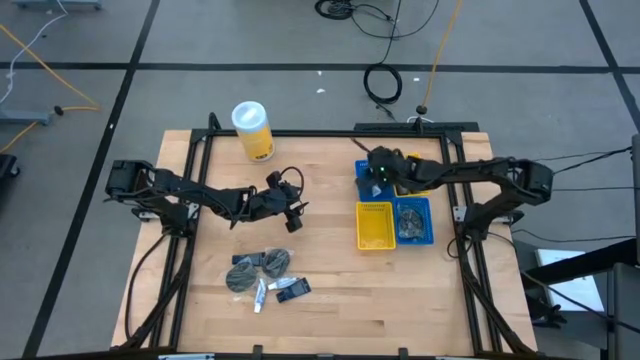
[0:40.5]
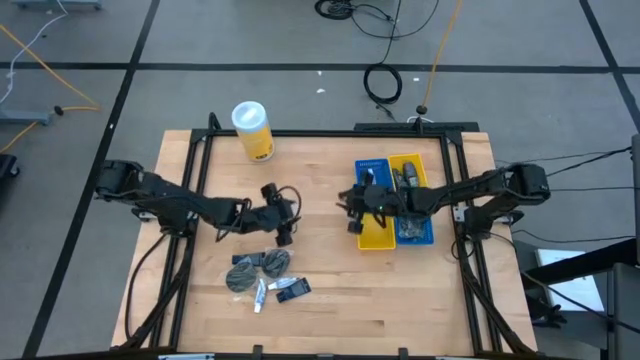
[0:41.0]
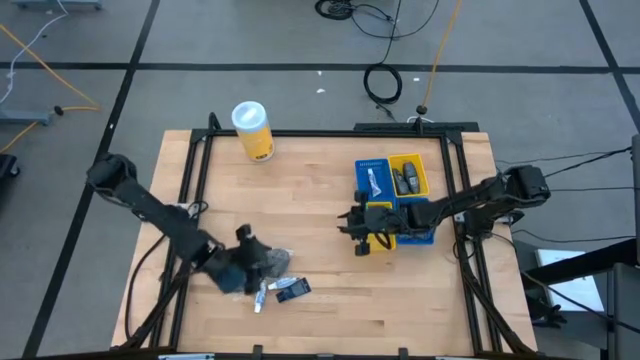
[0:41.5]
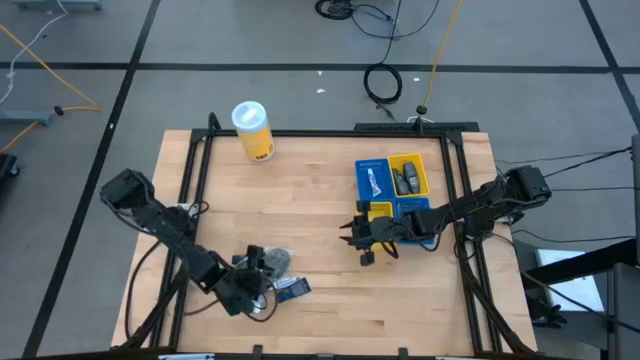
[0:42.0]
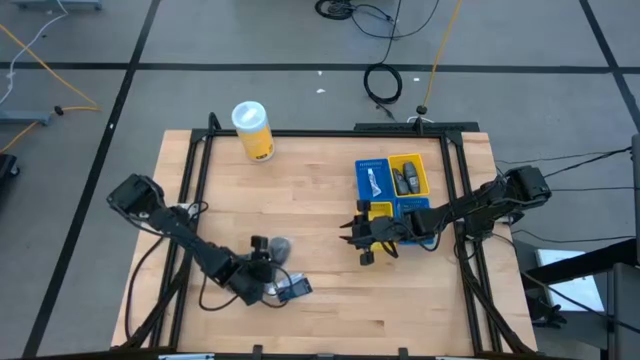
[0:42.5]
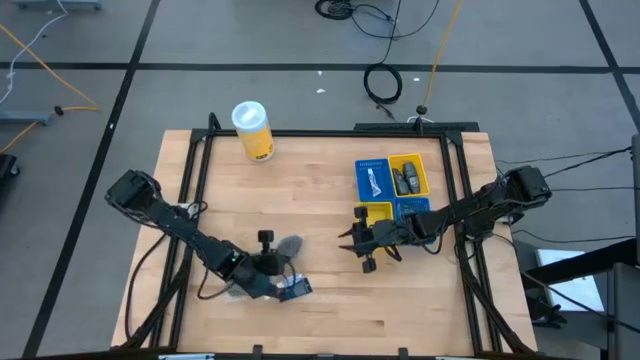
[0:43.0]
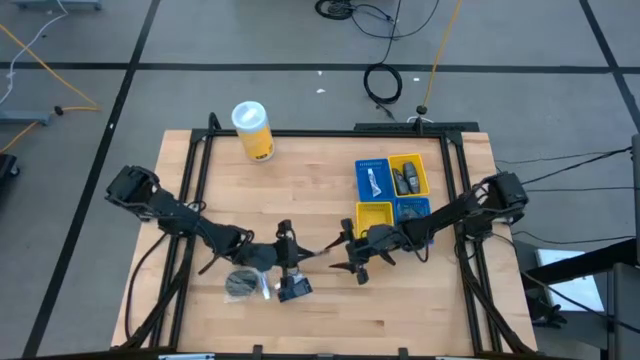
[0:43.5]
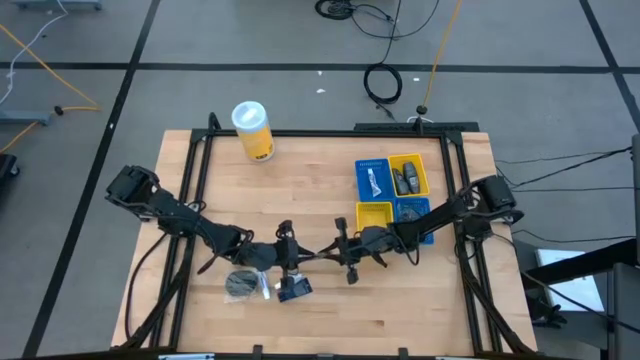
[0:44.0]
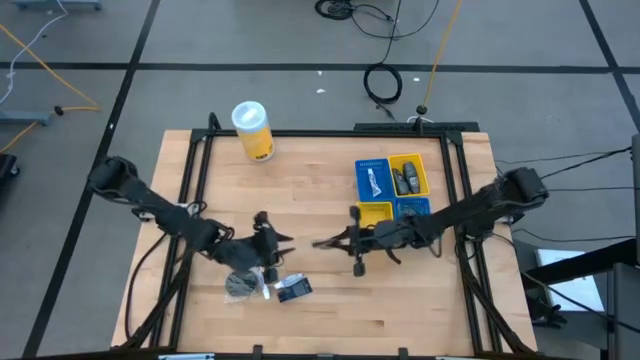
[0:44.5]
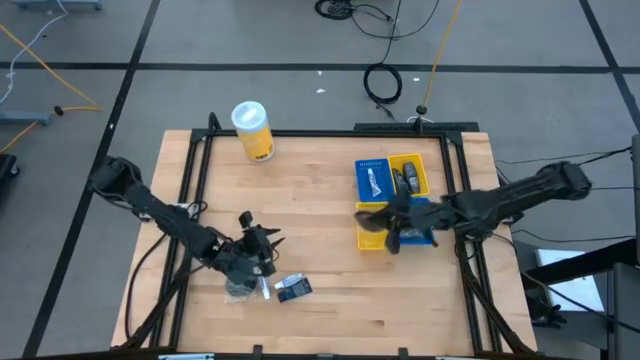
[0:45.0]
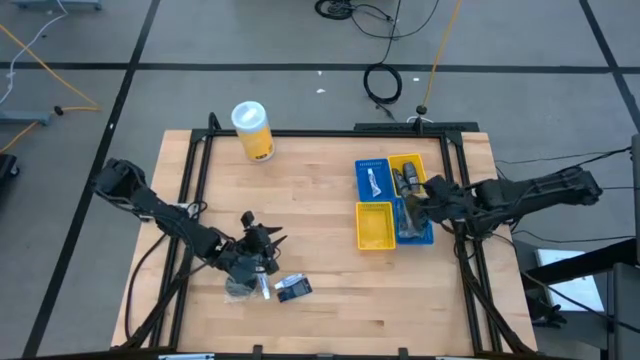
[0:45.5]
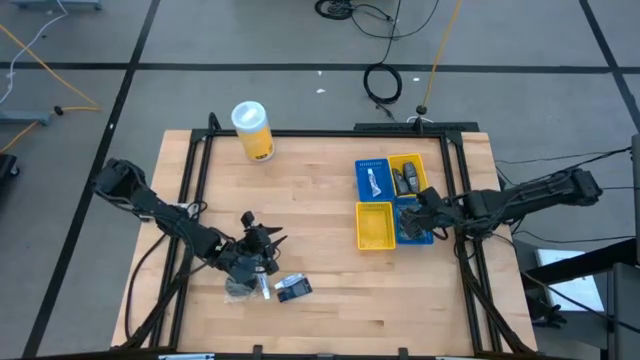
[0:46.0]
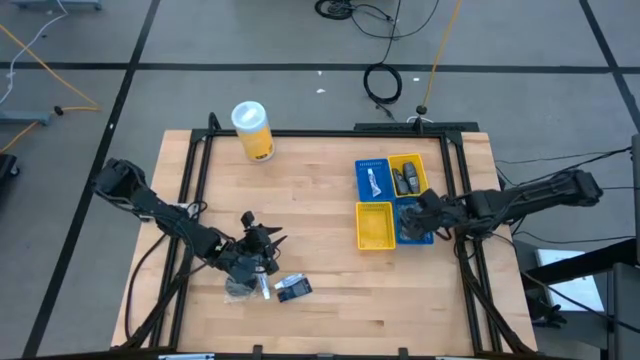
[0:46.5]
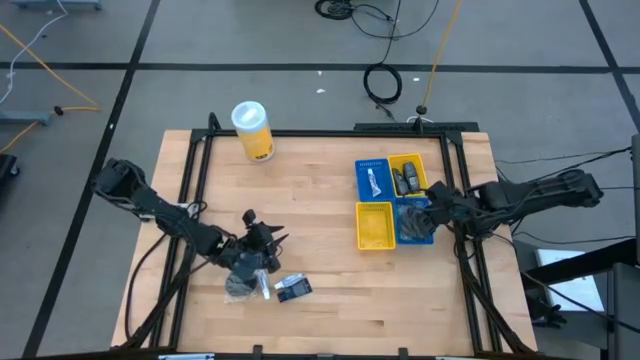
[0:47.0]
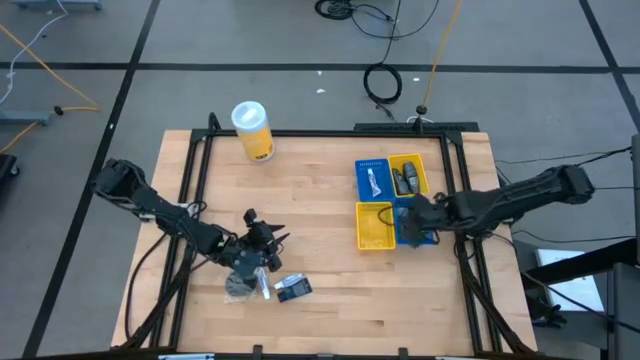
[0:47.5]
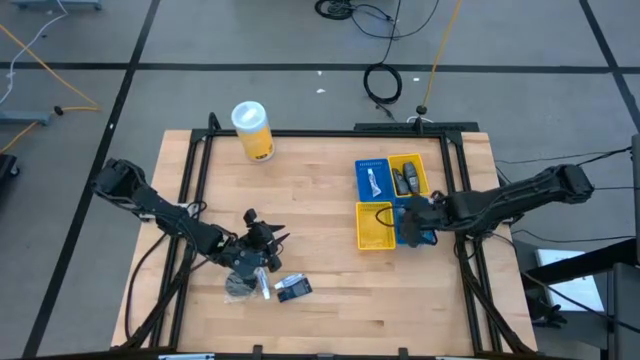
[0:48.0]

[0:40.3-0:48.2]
Task: Pick & Place Travel size toiletries
Put the black hairbrush into the bottom blue bin

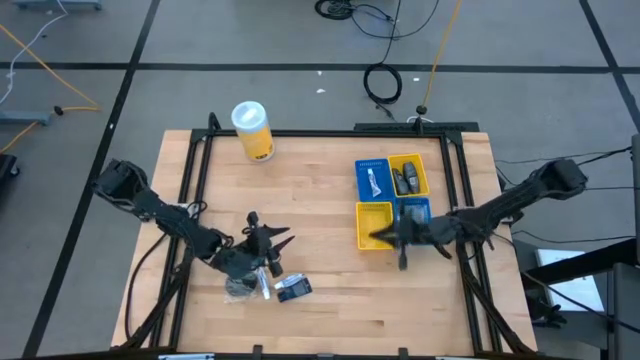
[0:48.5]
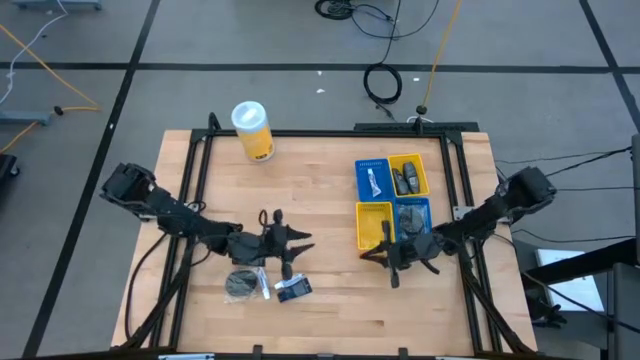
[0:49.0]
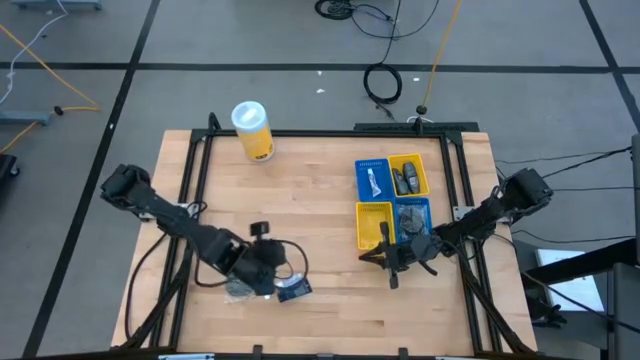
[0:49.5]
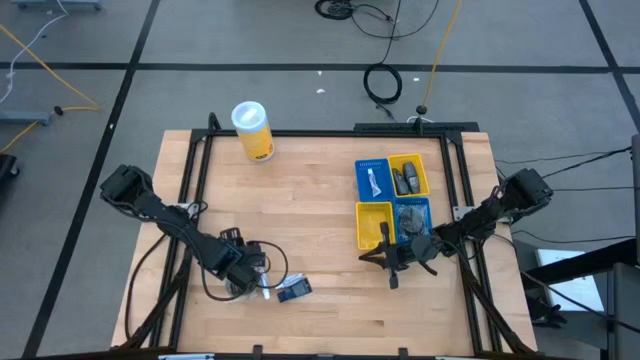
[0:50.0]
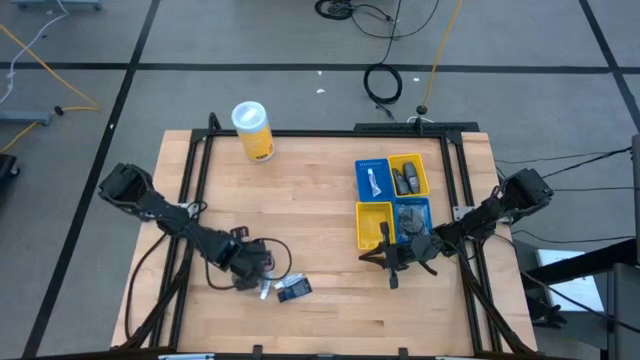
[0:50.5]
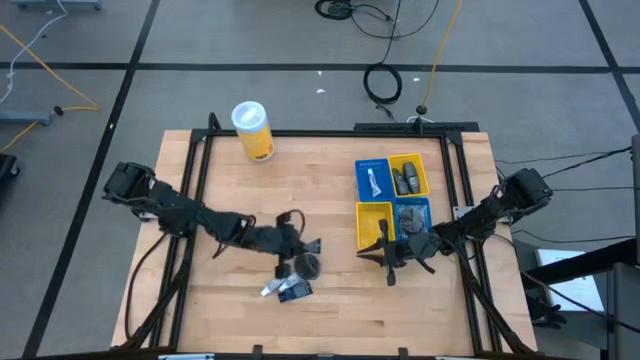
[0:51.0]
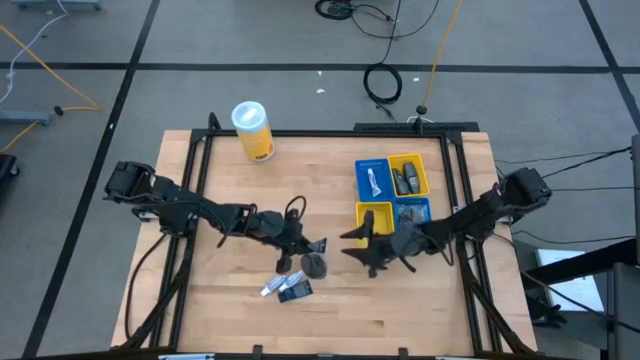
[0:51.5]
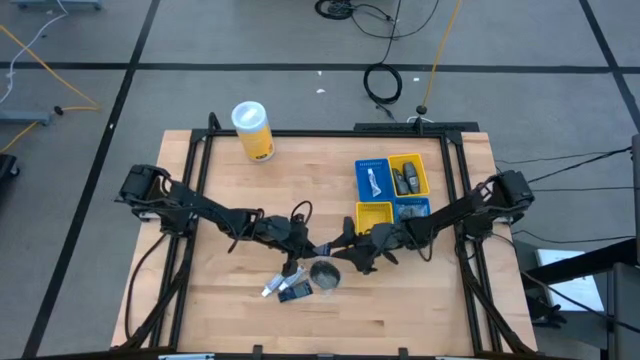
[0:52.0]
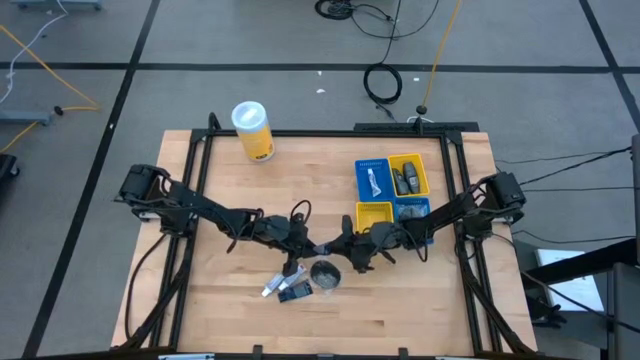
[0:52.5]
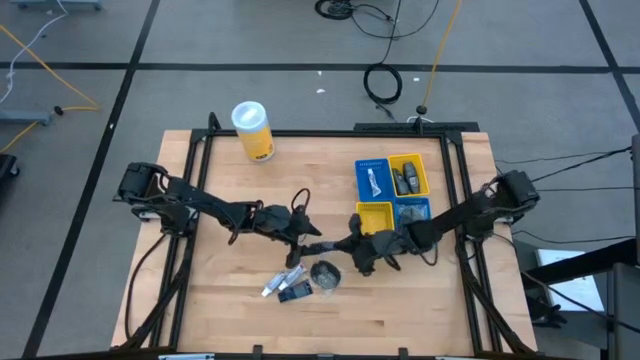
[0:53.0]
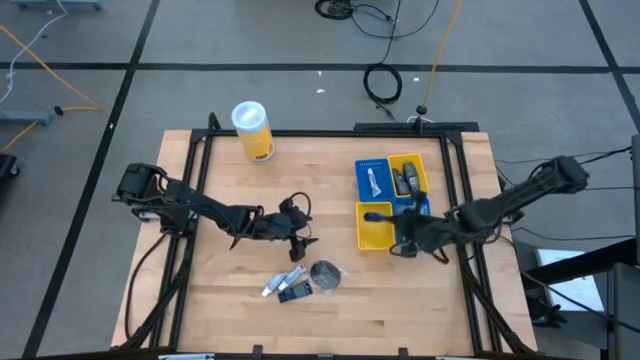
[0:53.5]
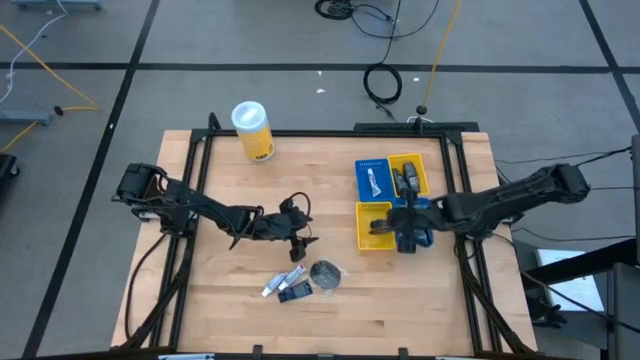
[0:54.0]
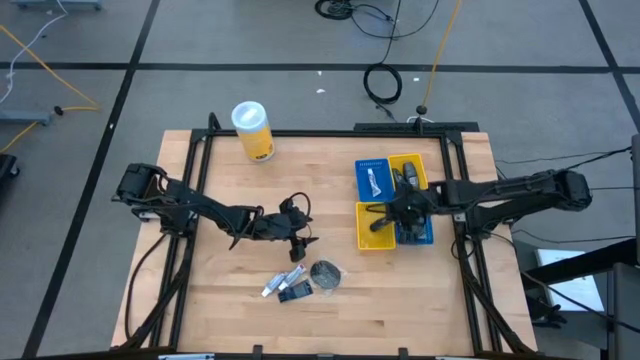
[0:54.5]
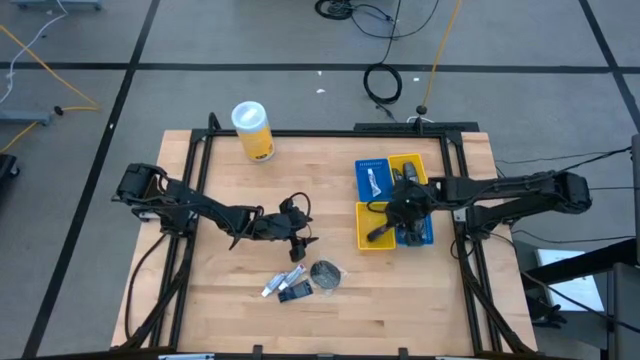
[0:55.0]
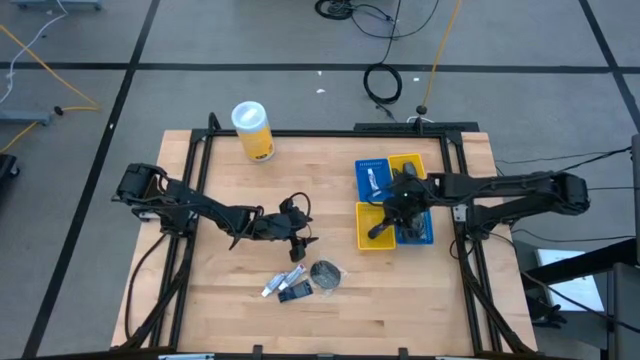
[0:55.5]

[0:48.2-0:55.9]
Put the blue shave cream into the bottom yellow bin

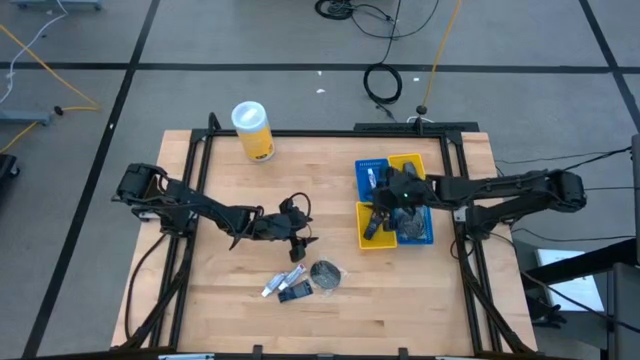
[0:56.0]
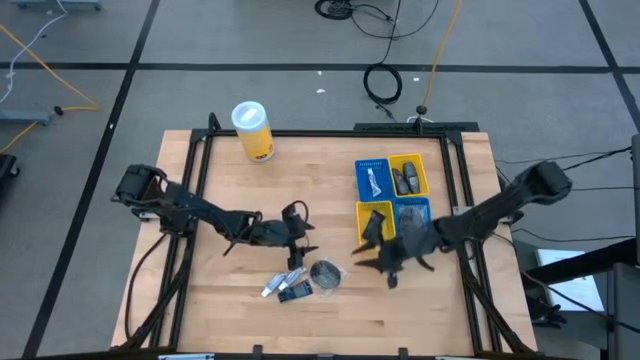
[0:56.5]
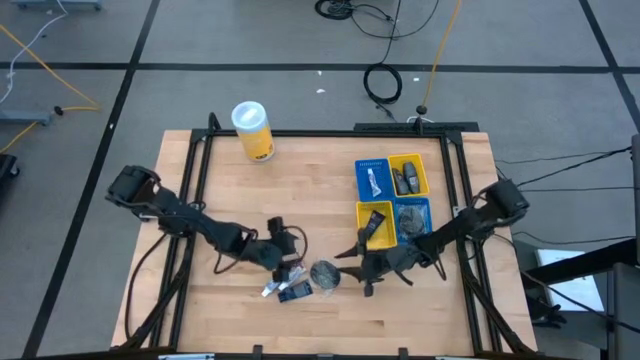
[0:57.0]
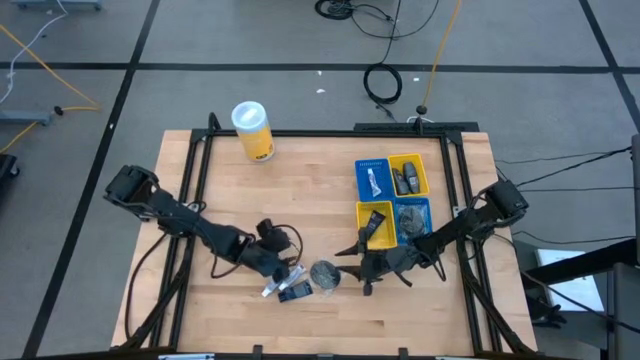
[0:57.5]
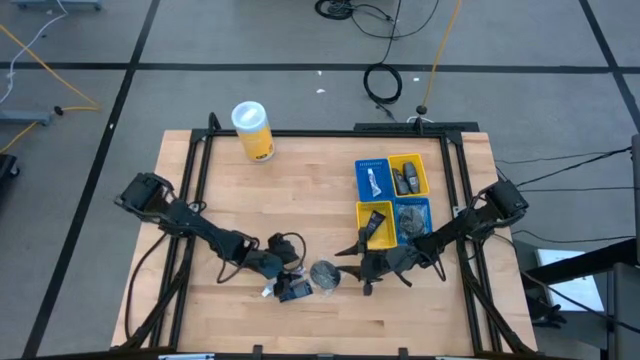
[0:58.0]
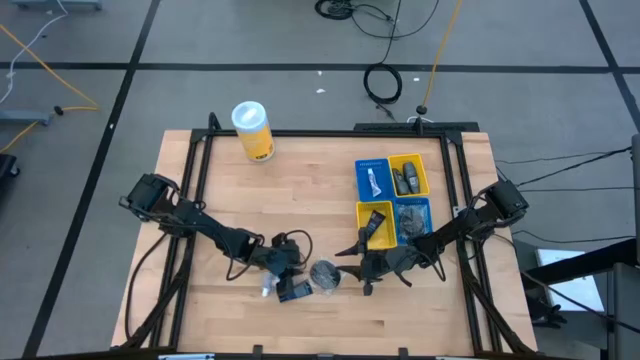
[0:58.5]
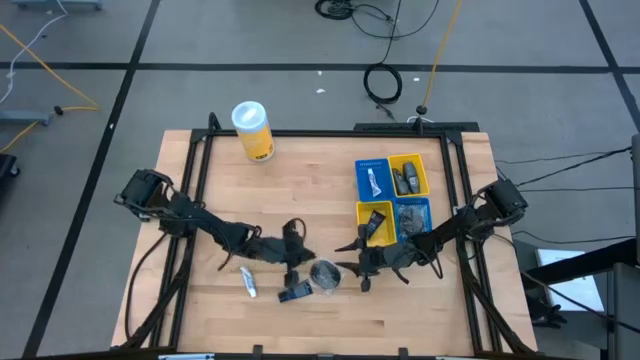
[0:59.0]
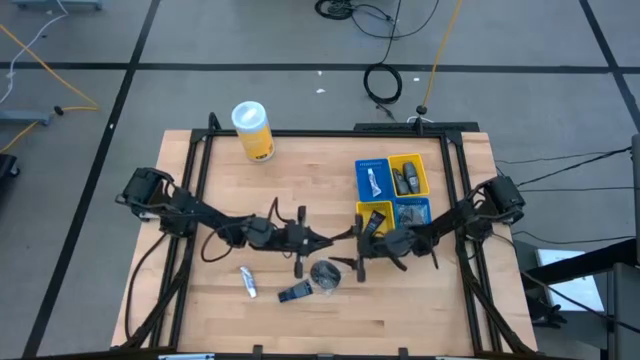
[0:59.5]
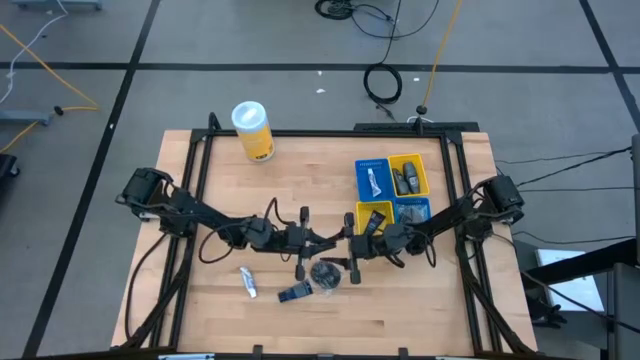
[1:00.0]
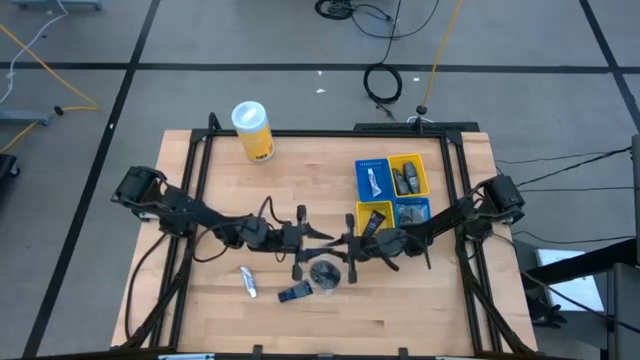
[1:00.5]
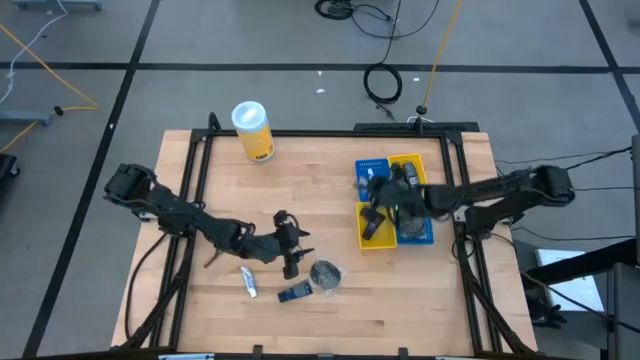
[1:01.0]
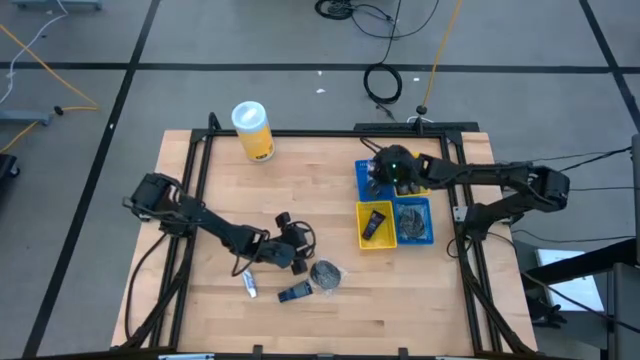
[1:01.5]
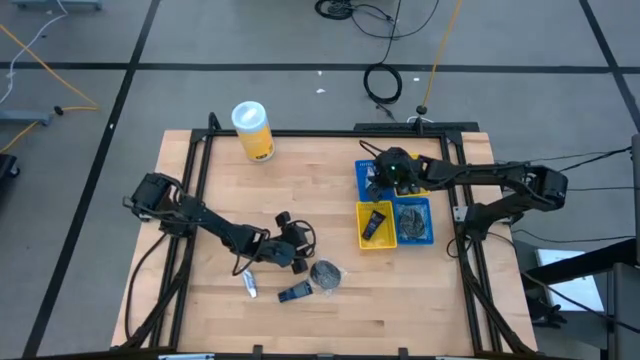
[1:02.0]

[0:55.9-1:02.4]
Put the white toothpaste into the top blue bin
